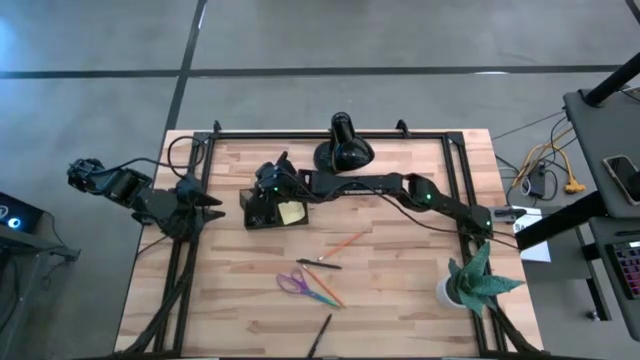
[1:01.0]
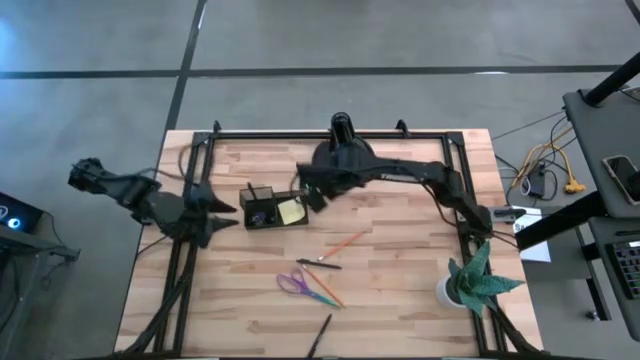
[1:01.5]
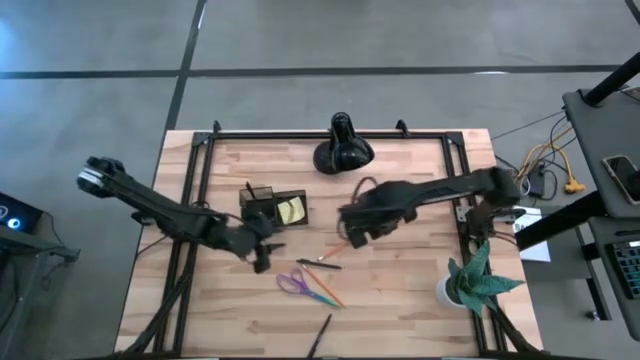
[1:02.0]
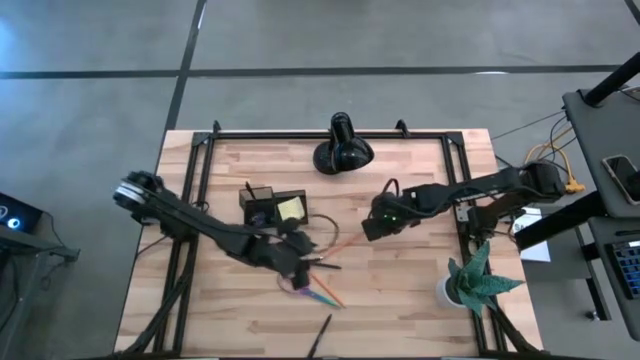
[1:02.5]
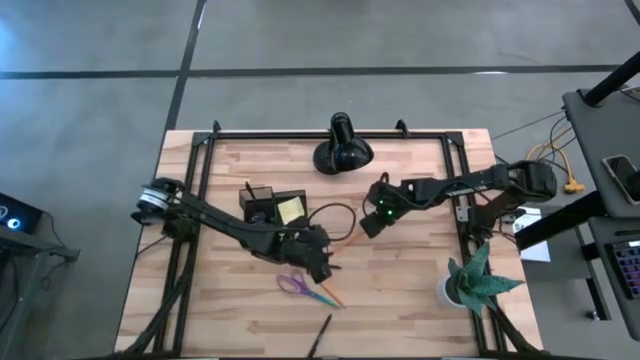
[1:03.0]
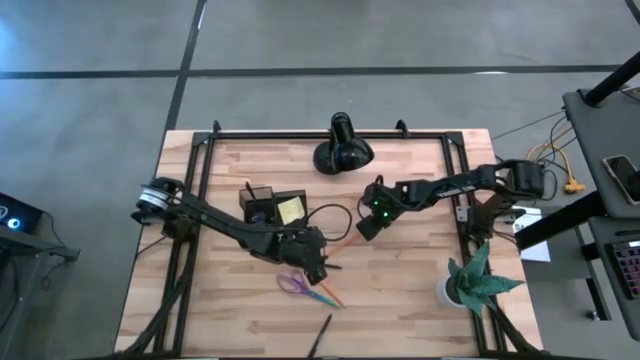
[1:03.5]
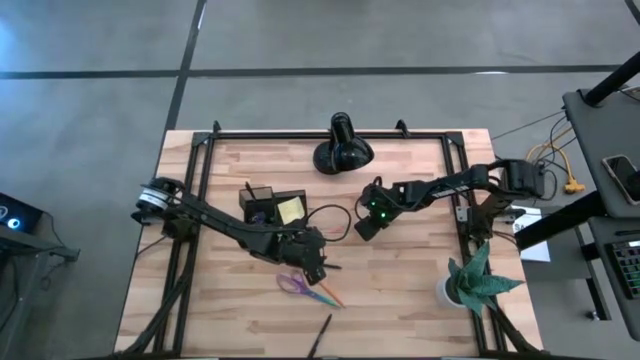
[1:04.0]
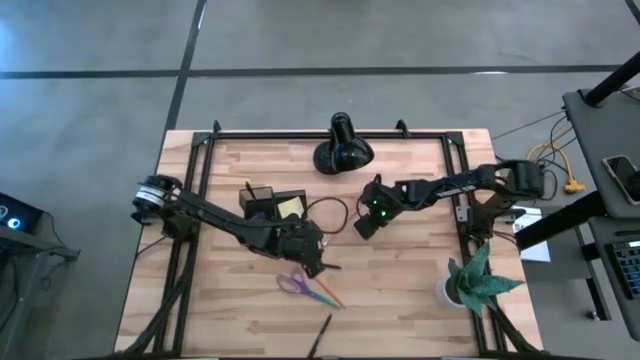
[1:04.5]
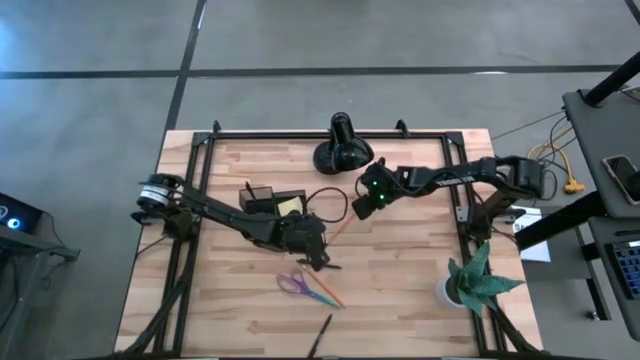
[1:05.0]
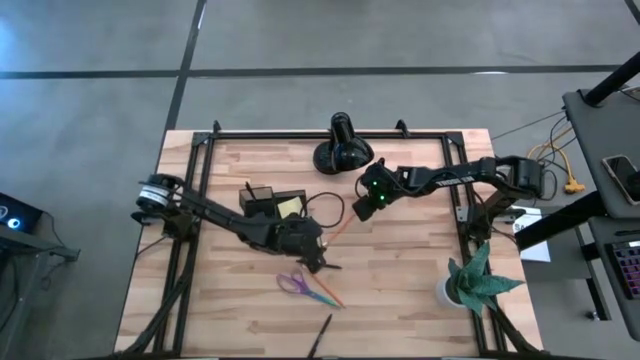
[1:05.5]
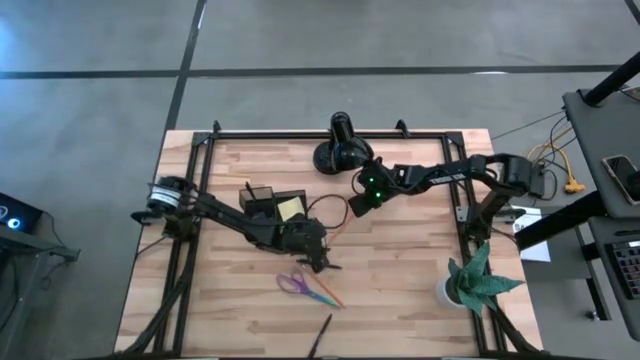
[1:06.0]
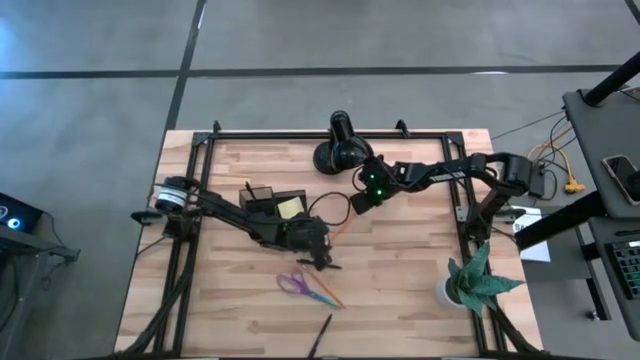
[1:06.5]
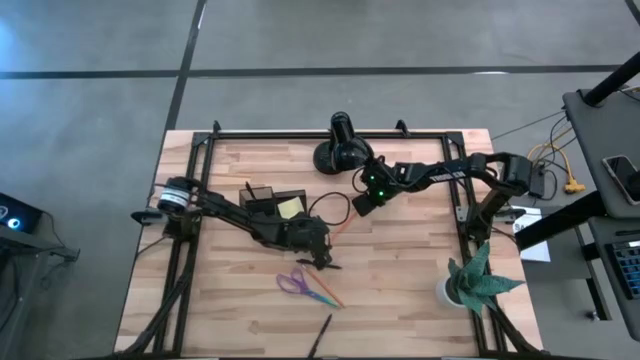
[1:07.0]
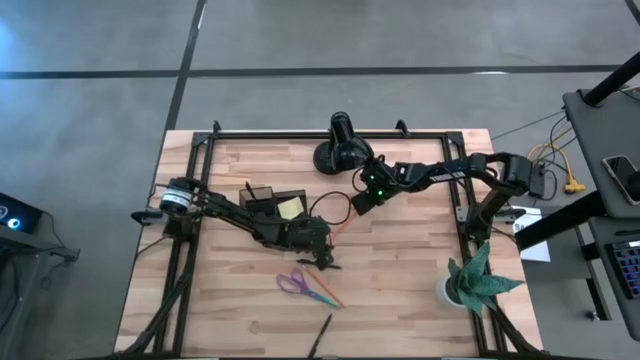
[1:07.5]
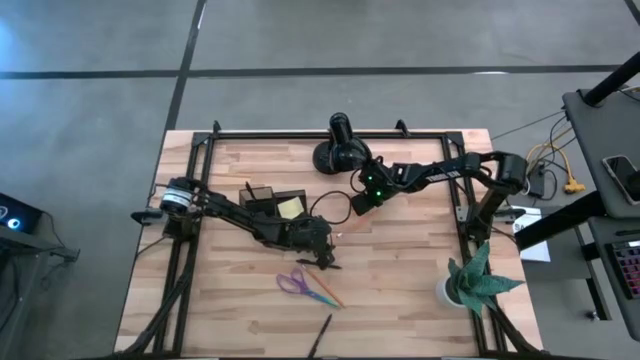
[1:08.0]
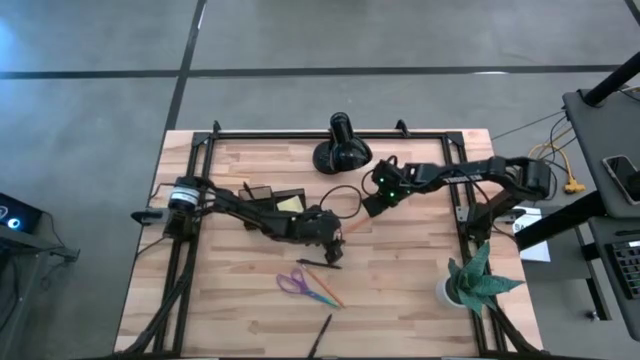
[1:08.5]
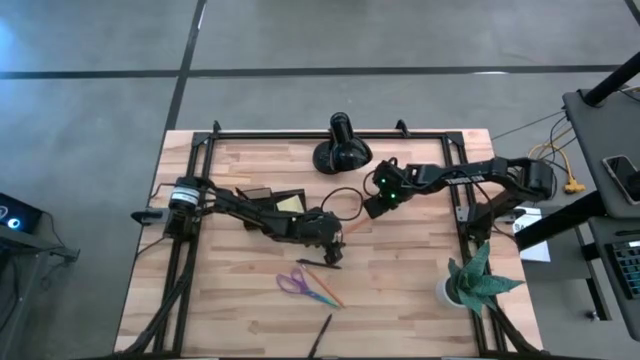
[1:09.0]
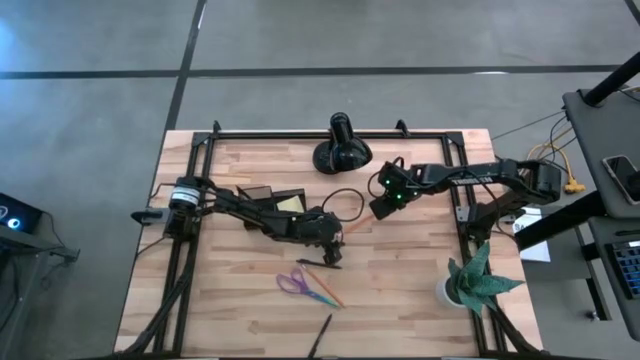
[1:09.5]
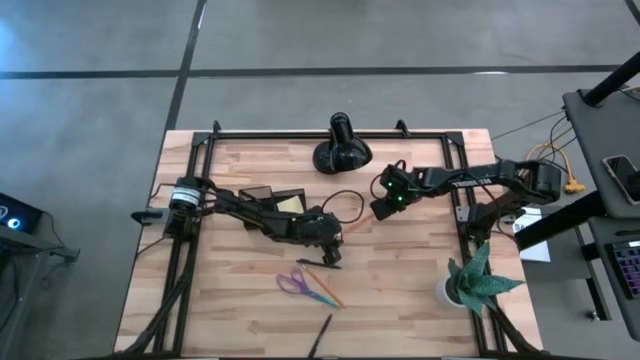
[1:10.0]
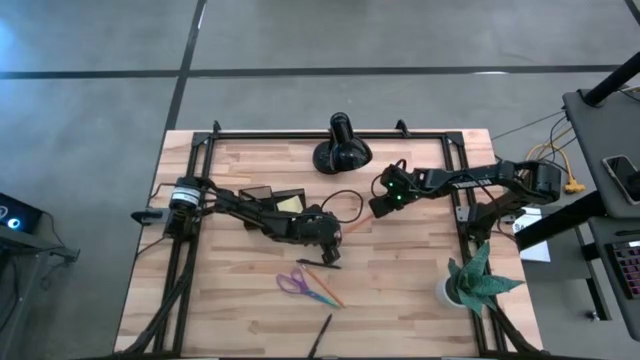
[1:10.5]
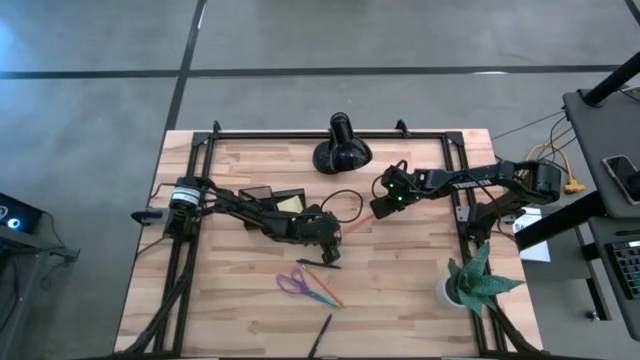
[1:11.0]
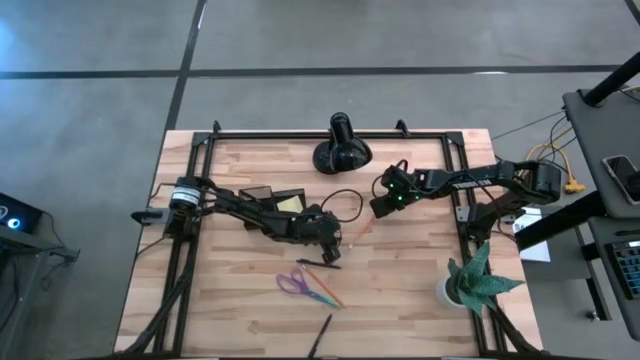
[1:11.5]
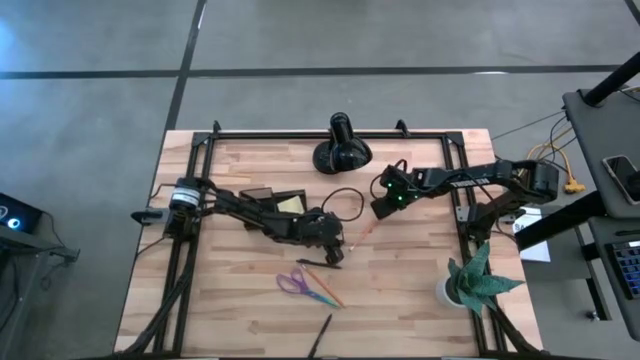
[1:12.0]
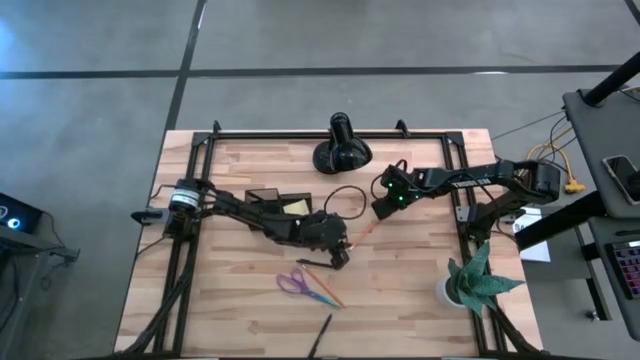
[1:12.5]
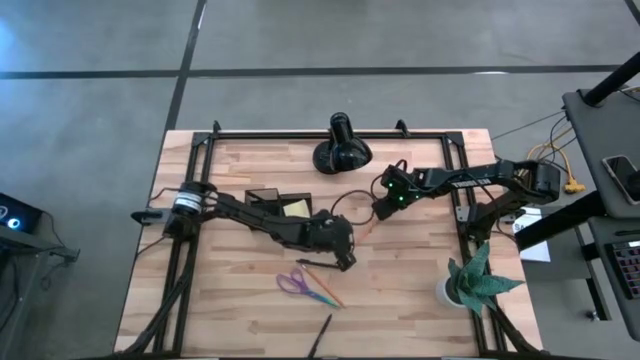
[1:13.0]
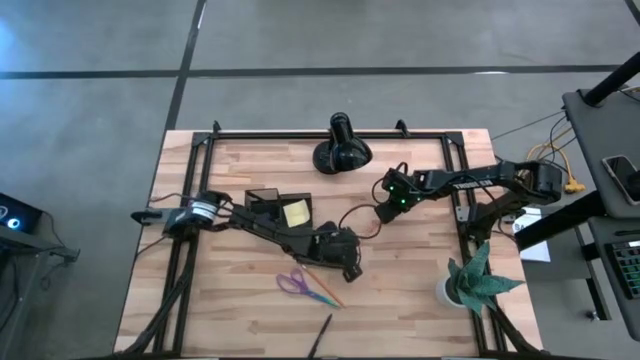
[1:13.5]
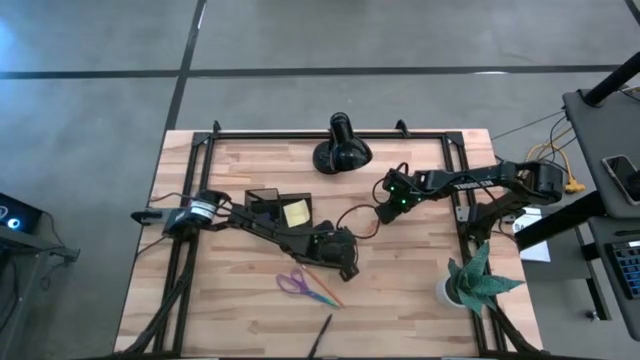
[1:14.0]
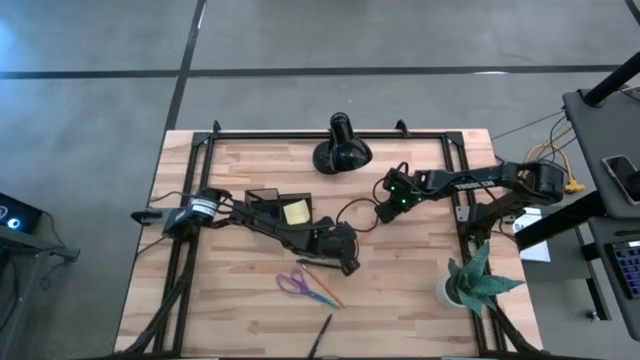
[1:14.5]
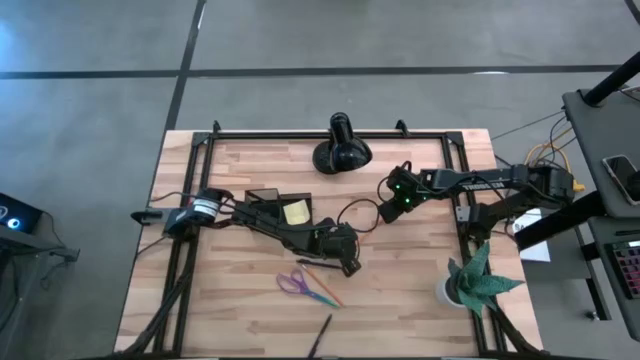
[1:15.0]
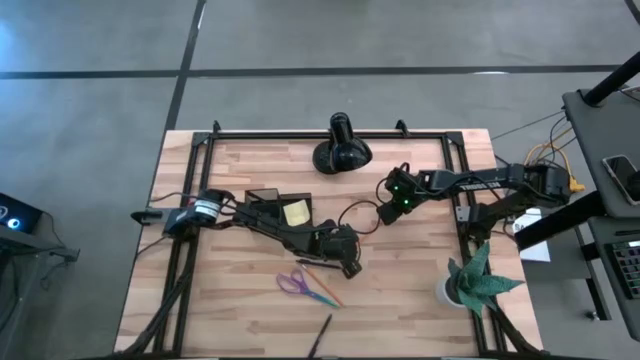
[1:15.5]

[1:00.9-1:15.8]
Task: Pick and place office supplies into organizer
Put the top yellow pencil into the black desk organizer

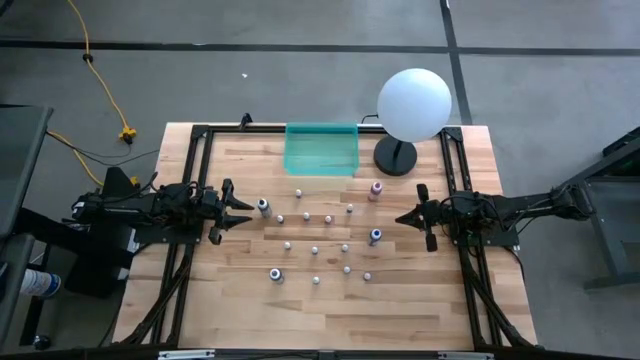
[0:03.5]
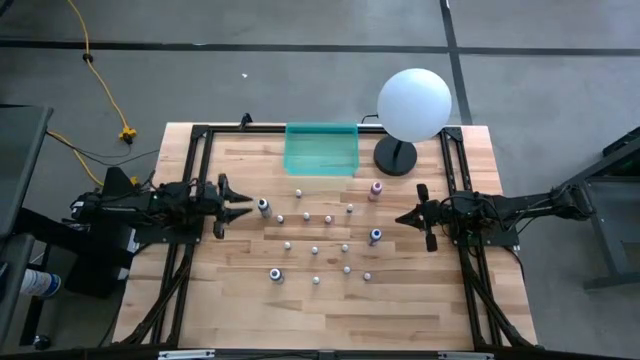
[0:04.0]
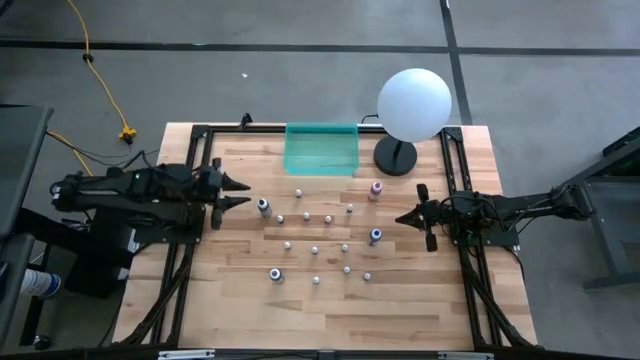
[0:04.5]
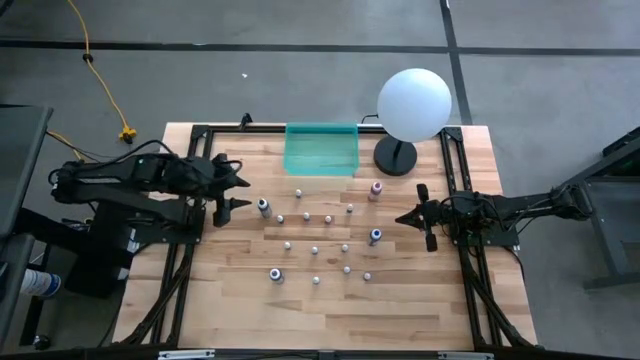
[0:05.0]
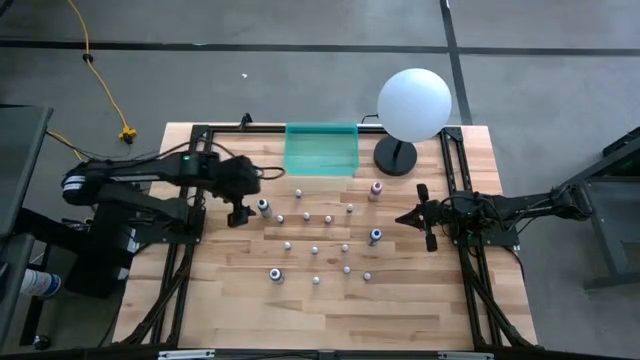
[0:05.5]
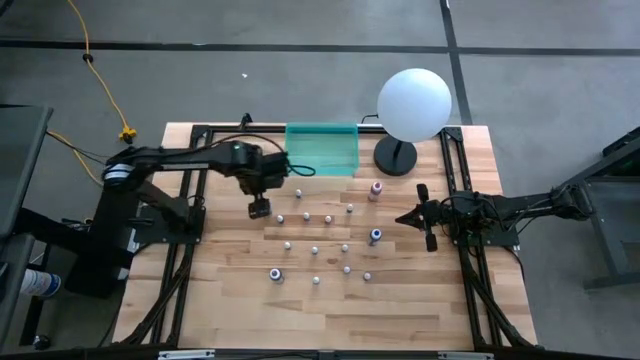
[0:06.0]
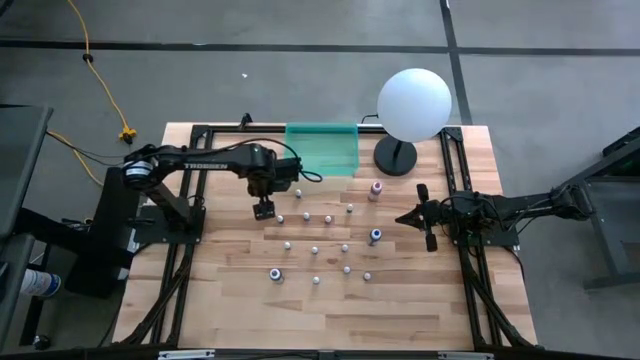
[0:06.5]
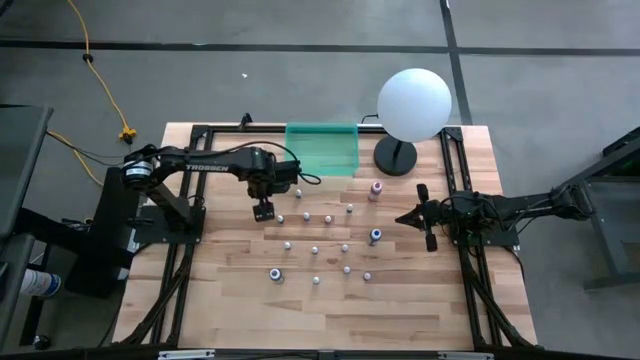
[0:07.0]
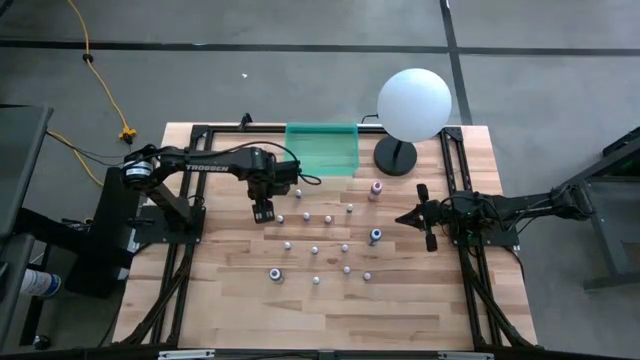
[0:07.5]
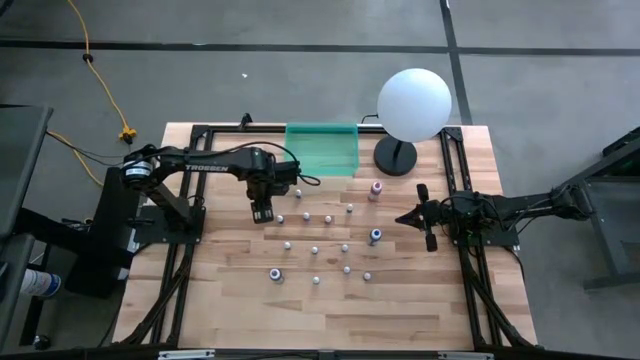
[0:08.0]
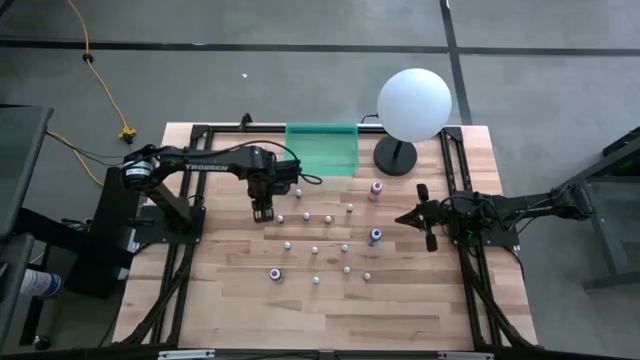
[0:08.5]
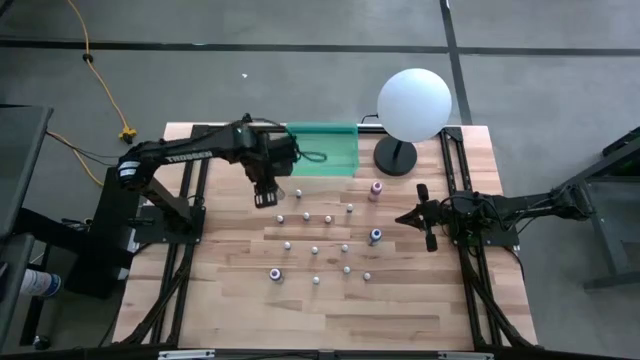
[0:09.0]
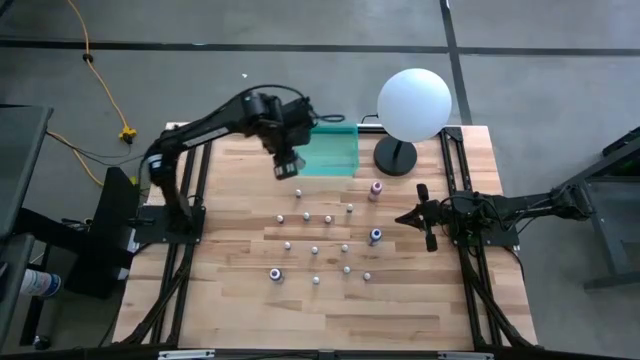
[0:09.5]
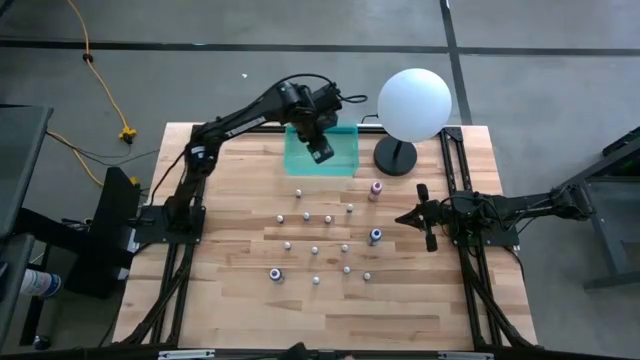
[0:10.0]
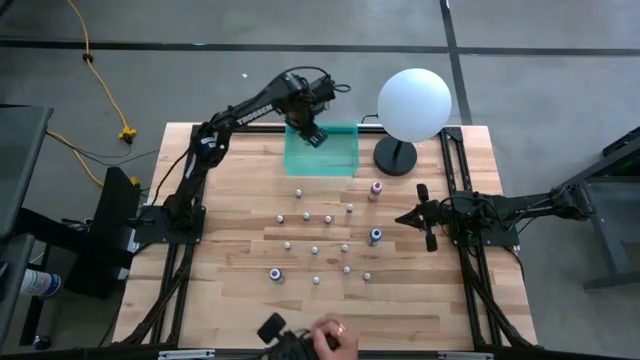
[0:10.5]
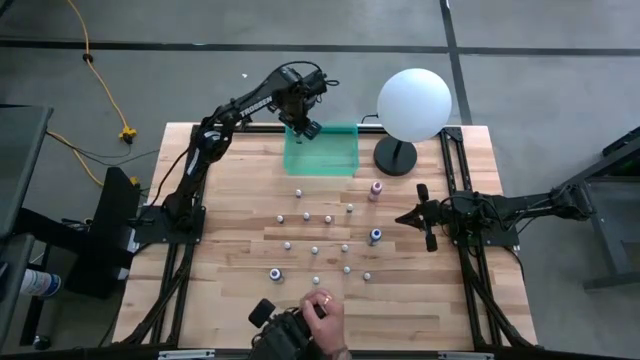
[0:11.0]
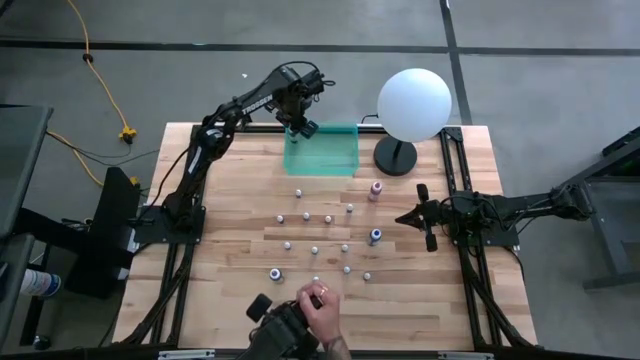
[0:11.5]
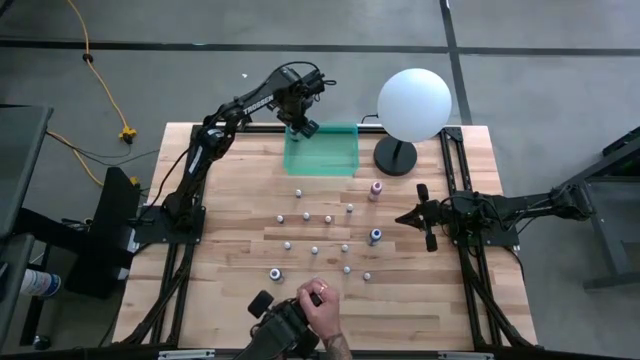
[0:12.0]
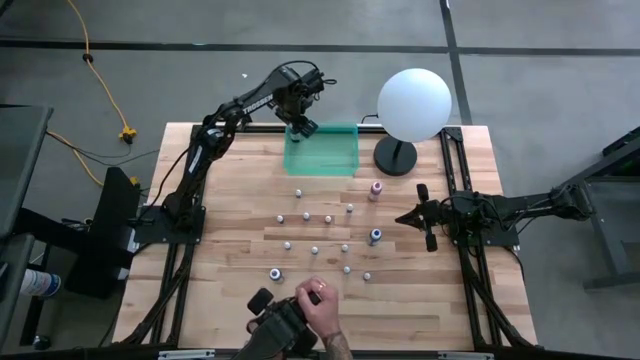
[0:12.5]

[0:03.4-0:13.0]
Task: Pick & Place food coloring
Put the big black food coloring bottle into the bin
